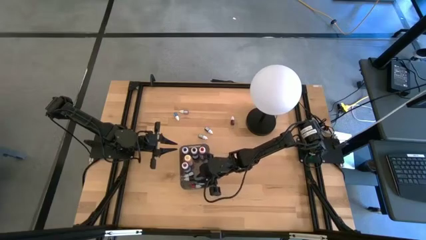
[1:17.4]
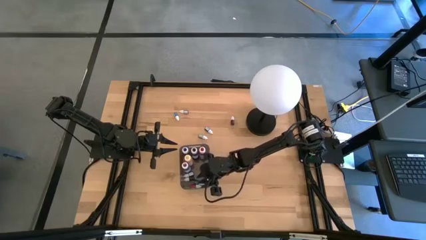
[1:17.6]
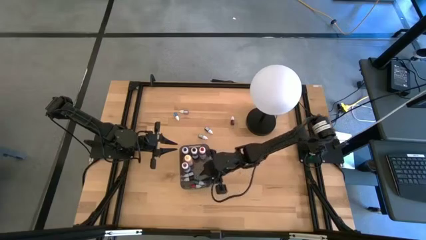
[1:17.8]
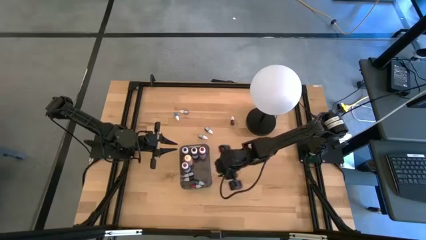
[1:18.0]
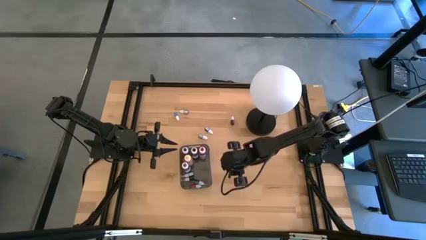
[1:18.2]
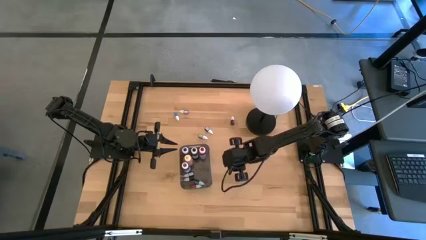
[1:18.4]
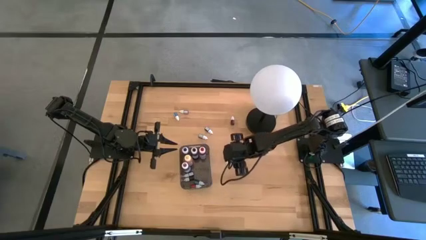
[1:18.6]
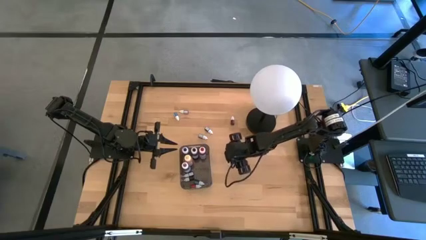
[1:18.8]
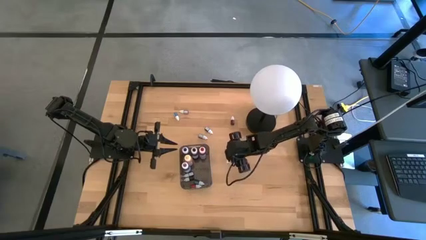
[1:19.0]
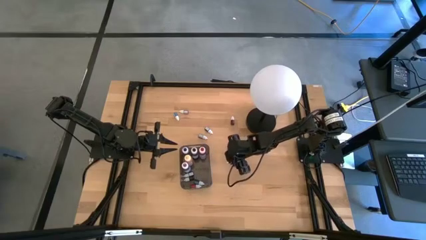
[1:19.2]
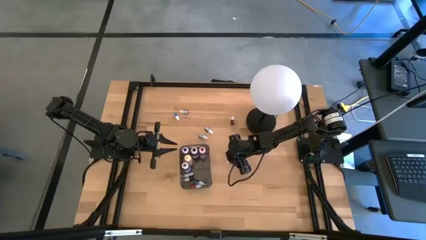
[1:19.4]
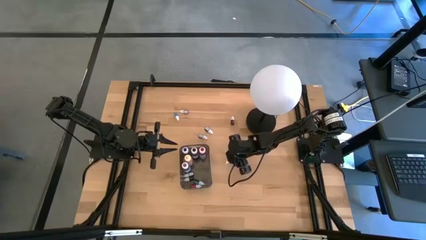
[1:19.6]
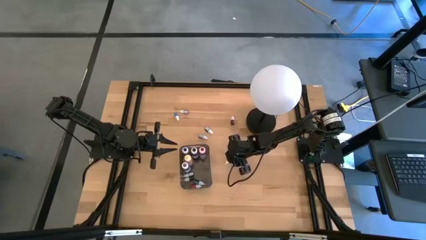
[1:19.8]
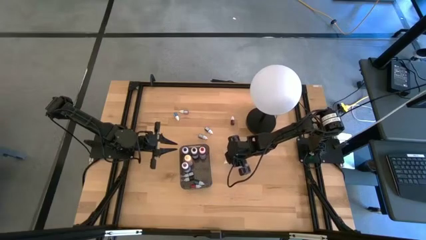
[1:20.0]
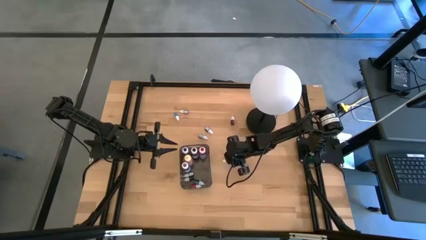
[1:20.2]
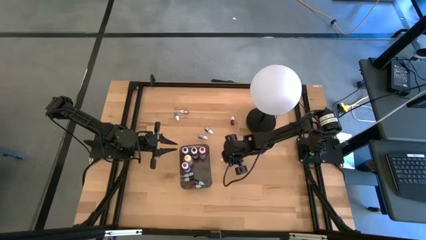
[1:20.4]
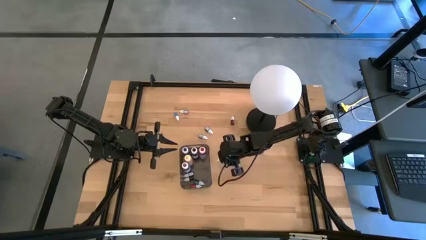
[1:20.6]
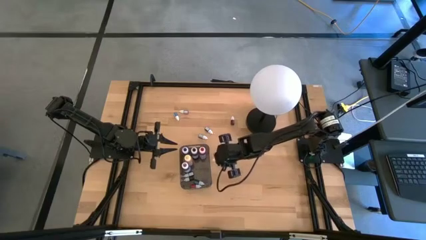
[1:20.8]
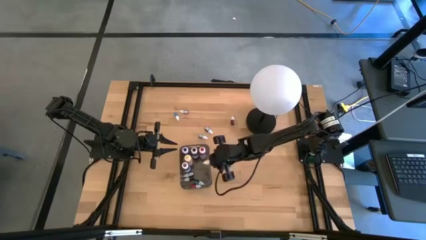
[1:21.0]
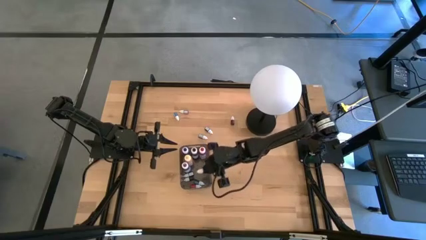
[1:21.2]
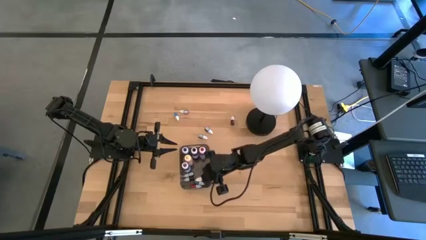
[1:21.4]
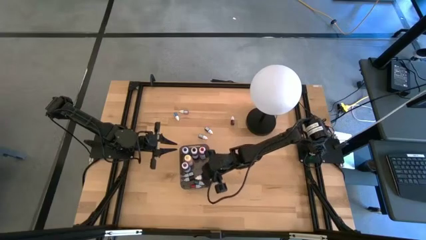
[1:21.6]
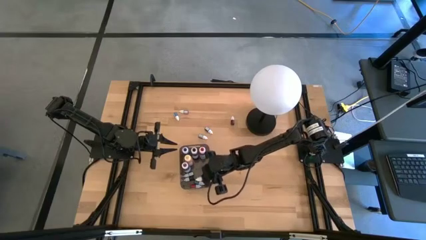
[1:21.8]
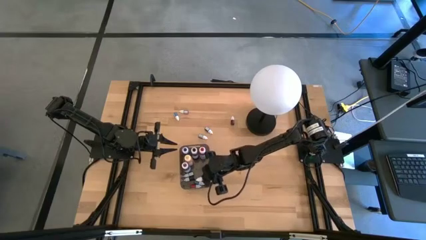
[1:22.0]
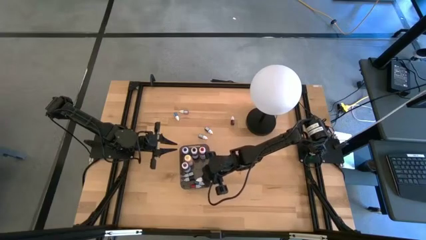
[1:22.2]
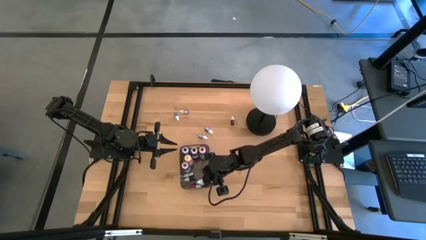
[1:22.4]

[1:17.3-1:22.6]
Task: Pick & Place food coloring
Put the small red food coloring bottle into the black bin

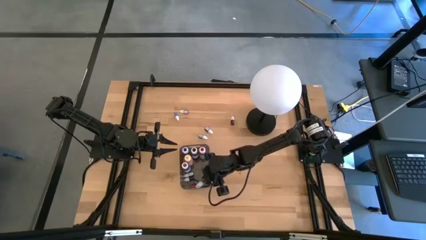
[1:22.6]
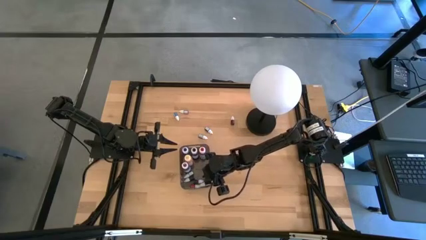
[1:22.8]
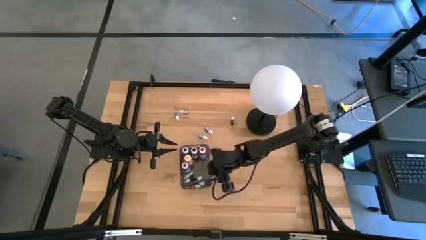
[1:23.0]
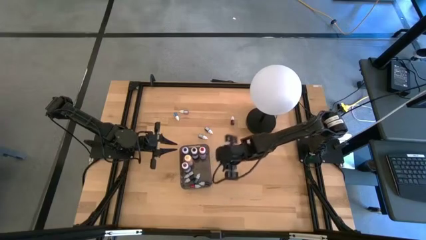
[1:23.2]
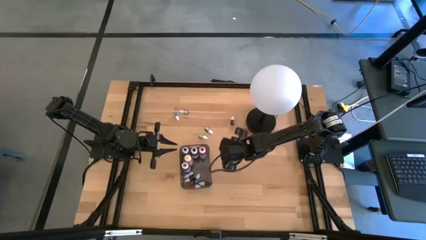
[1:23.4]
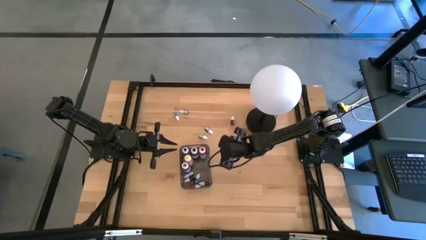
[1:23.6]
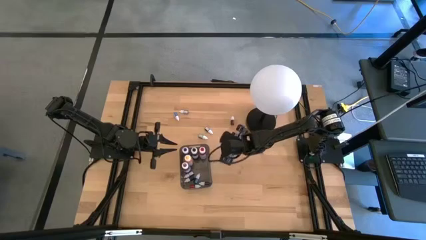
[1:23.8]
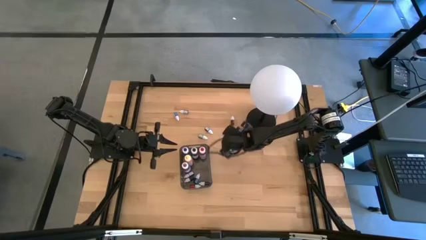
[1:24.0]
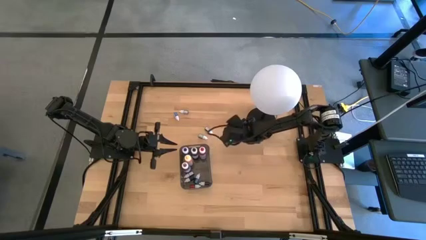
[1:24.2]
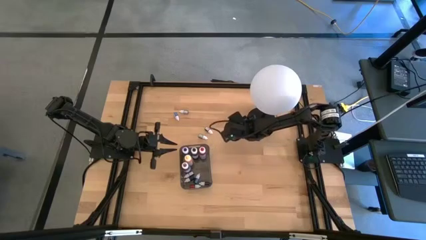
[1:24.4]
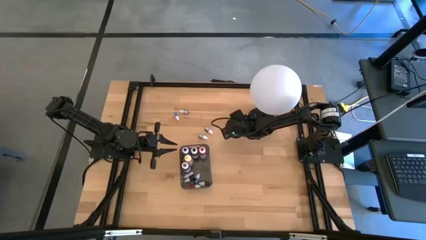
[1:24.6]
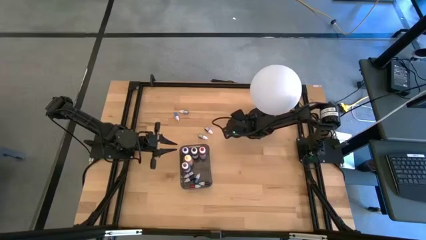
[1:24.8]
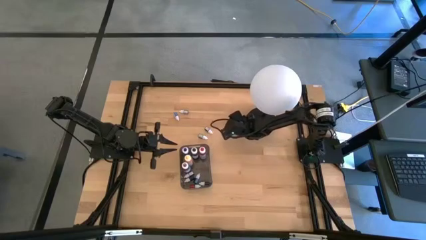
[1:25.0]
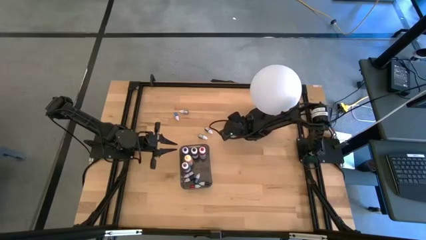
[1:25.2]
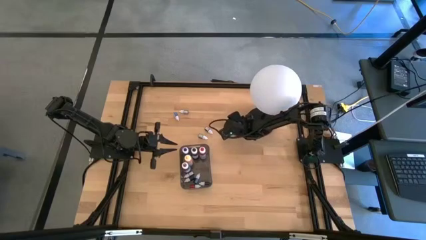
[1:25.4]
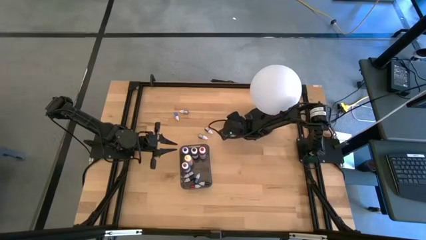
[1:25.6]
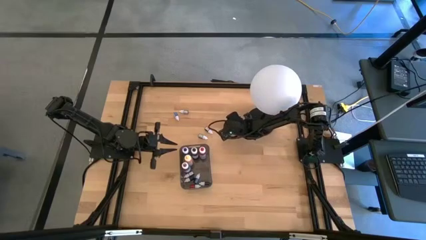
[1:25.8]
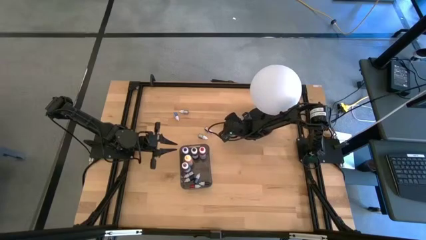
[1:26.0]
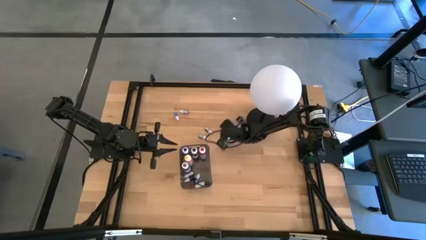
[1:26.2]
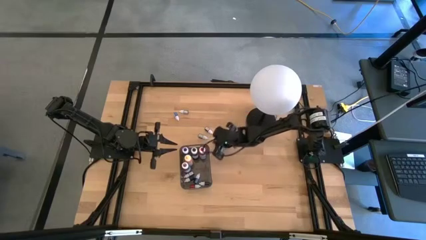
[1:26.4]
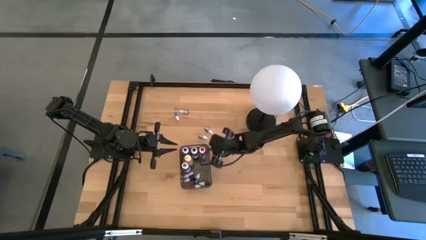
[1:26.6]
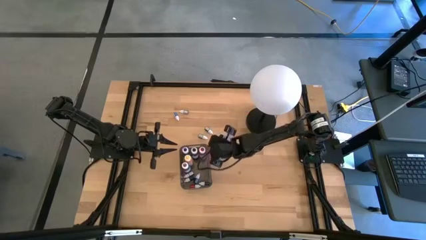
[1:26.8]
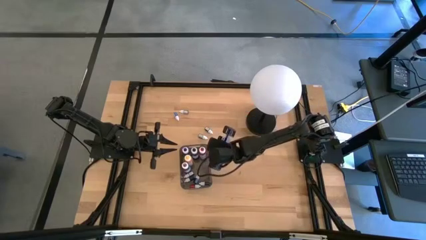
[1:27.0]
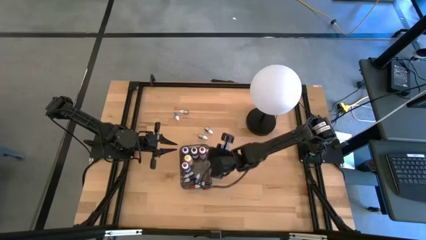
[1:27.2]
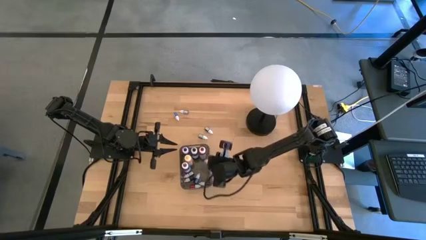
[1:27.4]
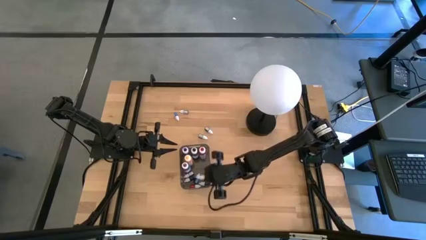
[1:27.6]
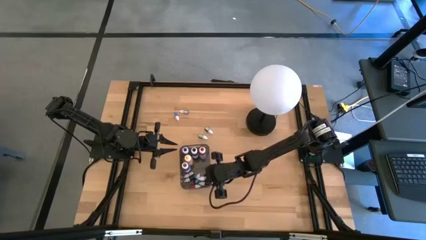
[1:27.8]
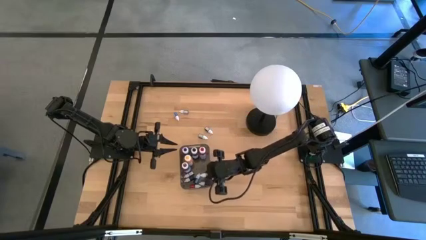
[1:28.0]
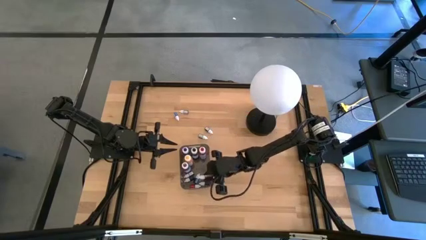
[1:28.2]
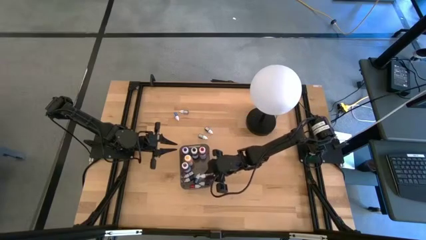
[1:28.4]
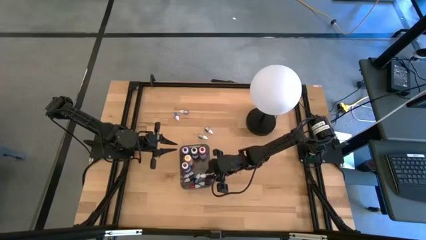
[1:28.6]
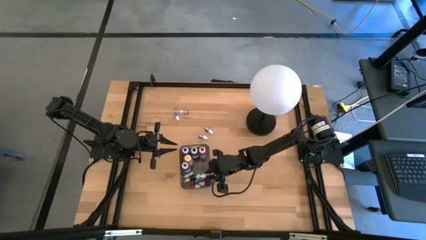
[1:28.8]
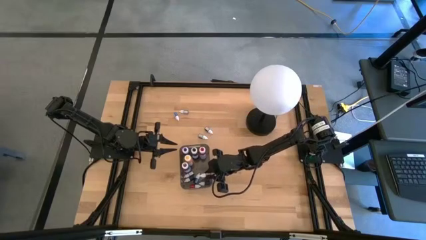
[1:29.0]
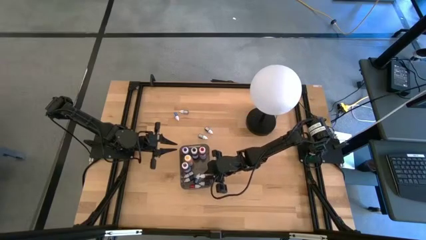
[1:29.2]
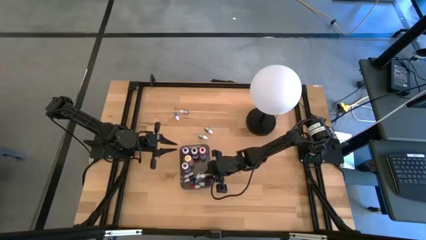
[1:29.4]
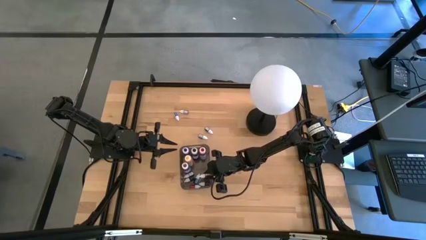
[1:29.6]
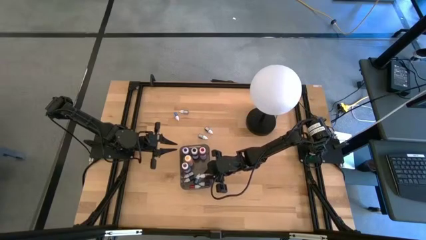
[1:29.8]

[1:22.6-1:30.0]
Put the small red food coloring bottle into the black bin

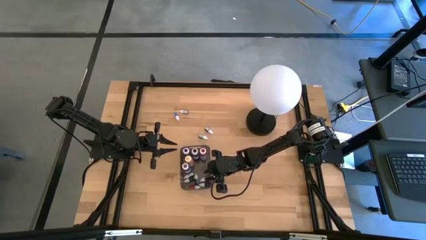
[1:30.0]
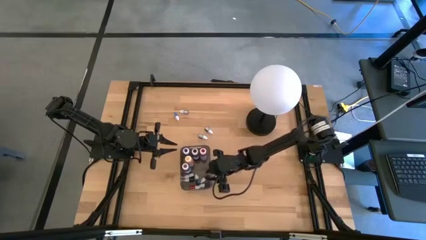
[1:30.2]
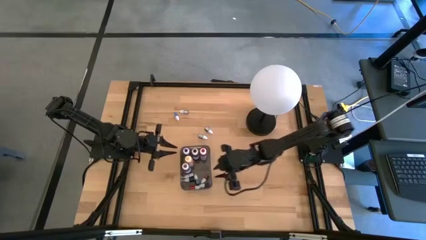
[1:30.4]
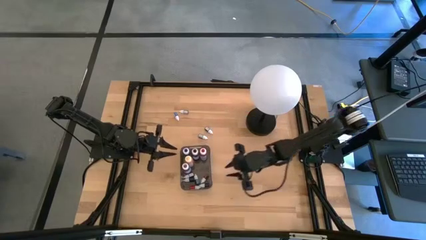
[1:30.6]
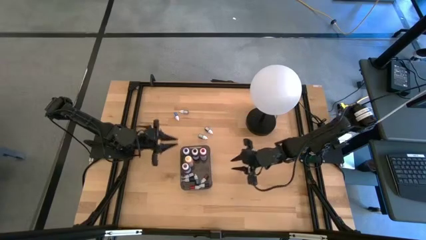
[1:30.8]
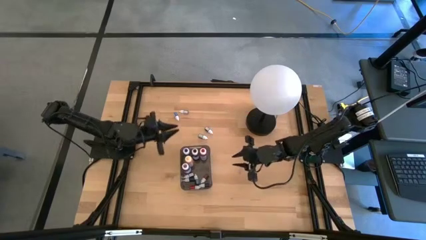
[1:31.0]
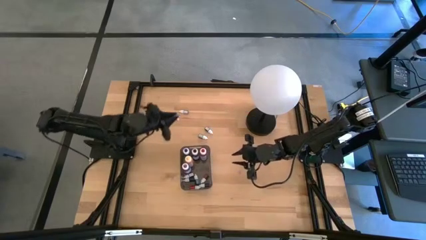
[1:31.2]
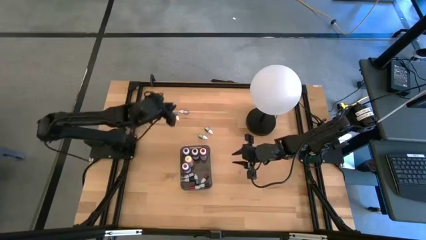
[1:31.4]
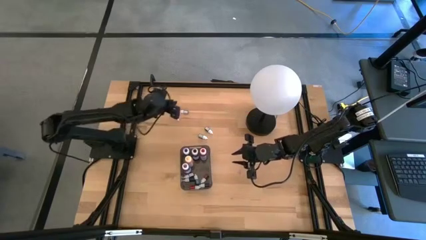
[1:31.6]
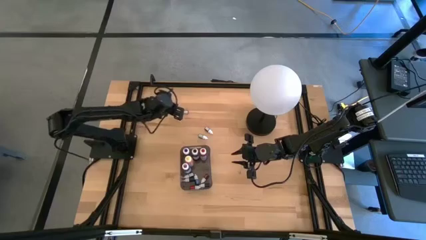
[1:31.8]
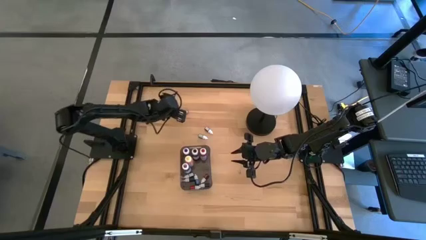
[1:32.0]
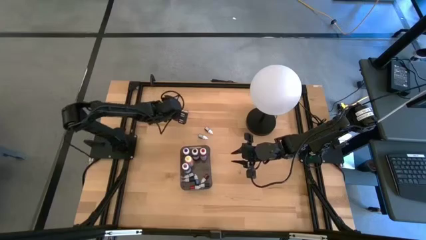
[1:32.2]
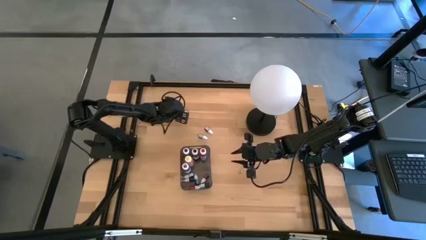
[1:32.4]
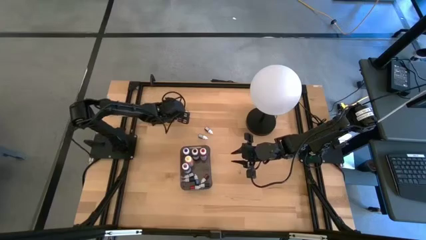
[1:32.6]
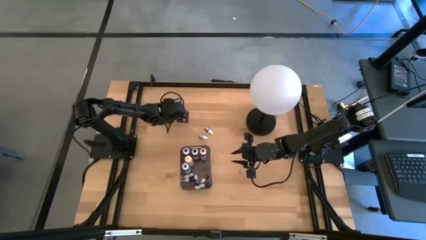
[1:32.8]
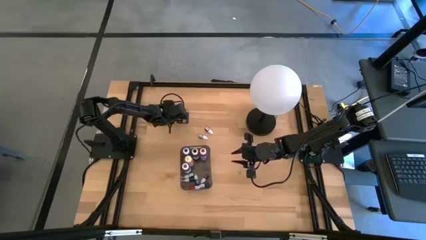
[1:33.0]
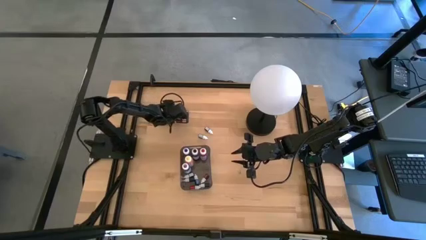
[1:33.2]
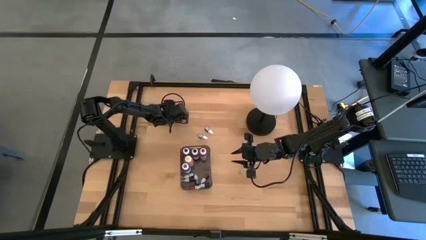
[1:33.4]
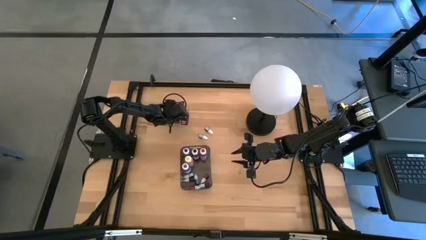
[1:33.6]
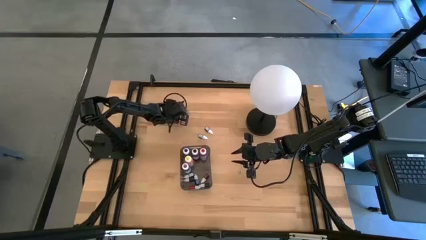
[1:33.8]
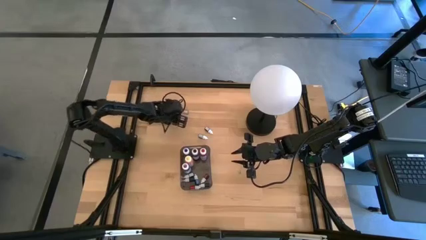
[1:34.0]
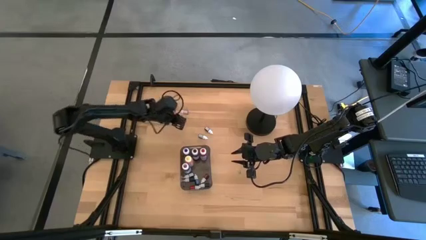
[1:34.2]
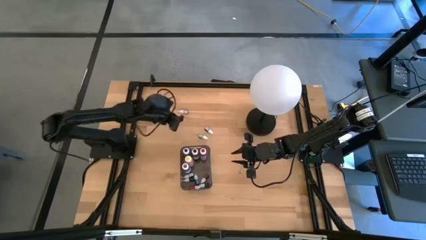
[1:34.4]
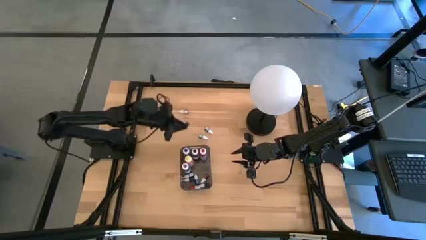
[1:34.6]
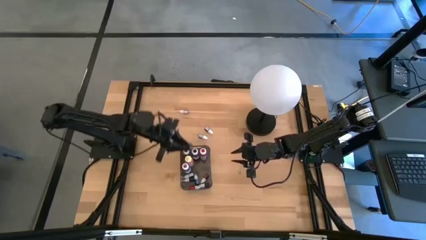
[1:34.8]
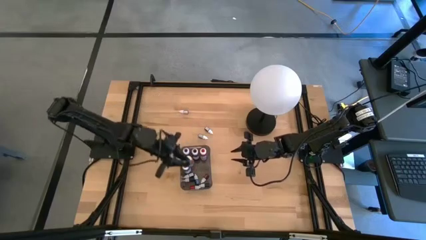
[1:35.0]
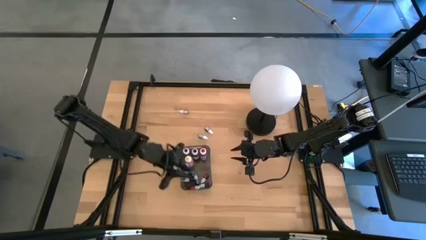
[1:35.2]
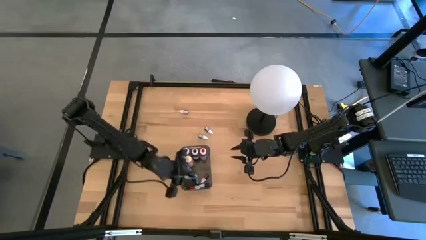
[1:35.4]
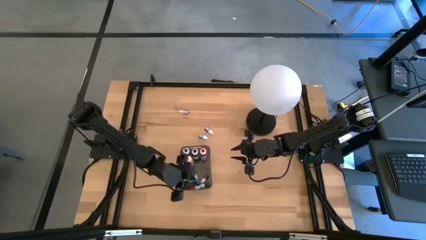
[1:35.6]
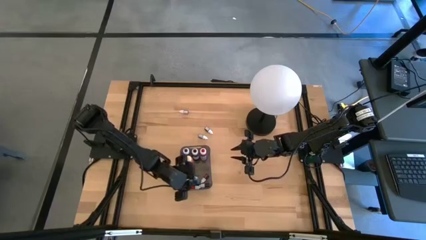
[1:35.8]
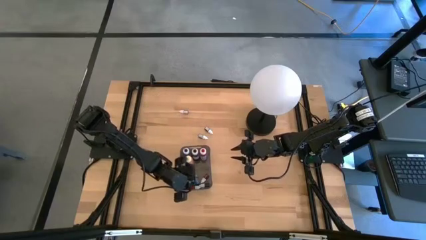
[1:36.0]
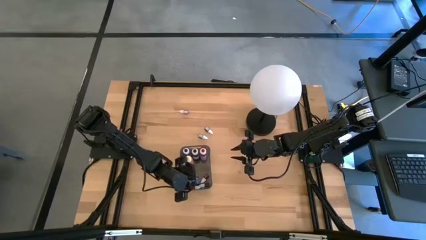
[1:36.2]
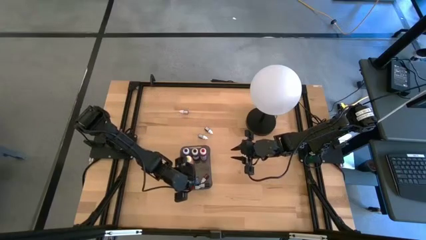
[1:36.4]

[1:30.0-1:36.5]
Put the small blue food coloring bottle into the black bin
